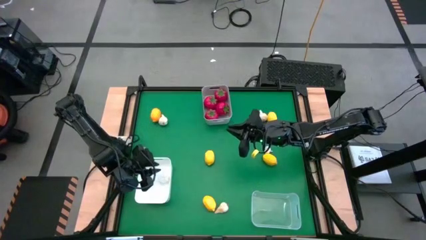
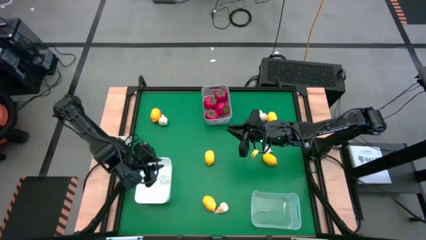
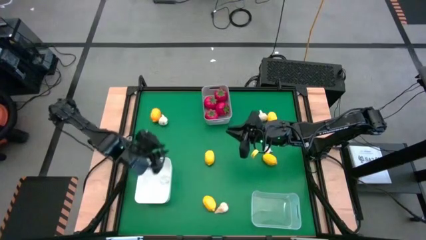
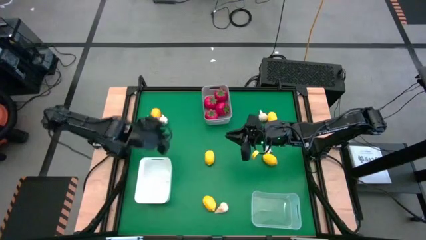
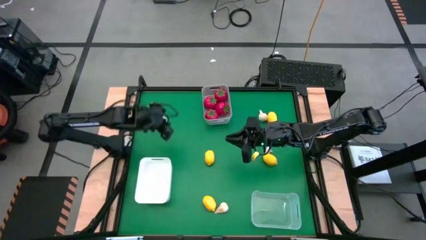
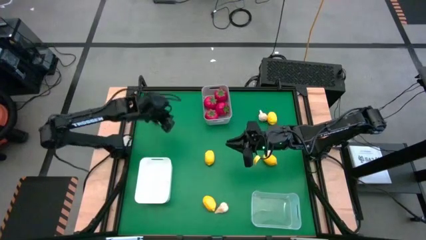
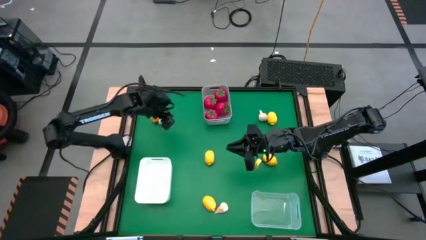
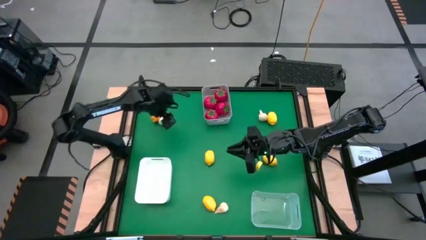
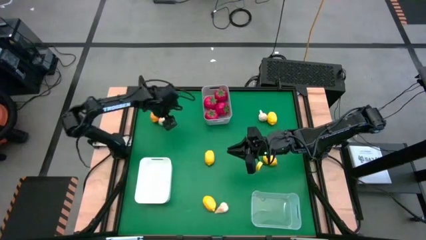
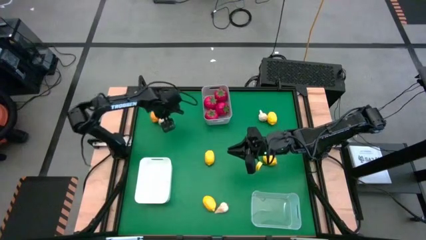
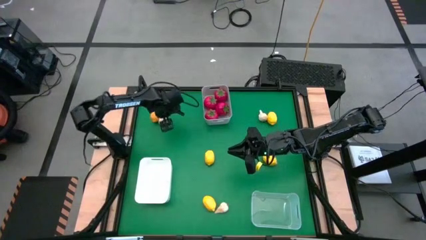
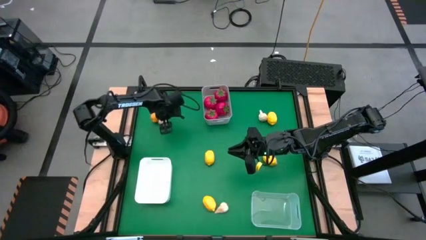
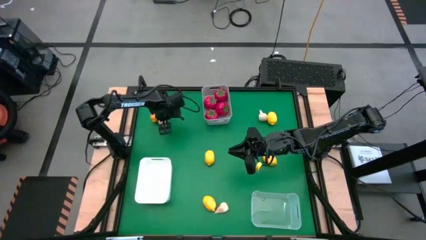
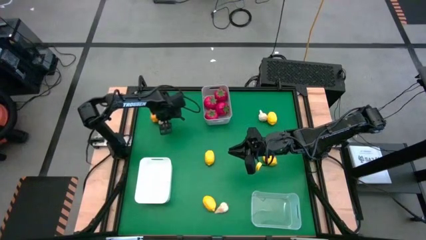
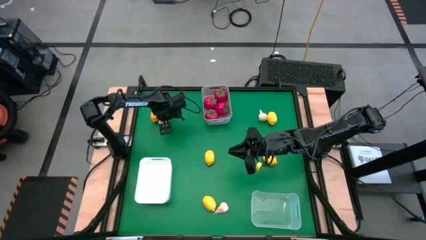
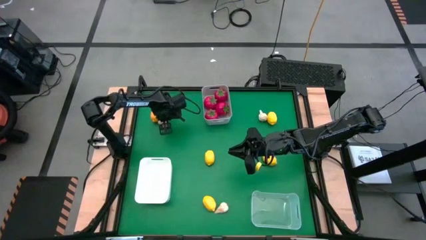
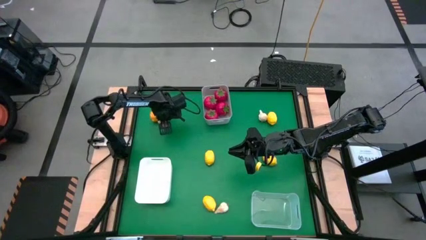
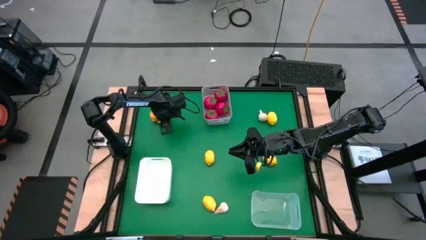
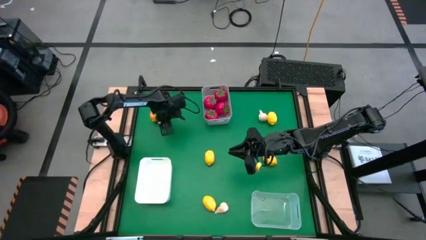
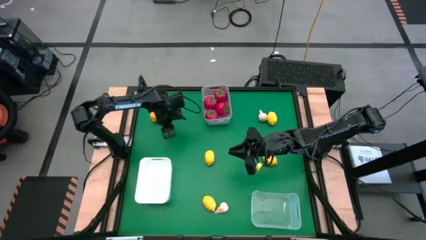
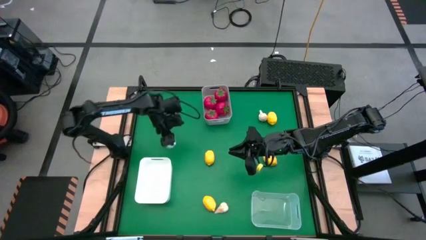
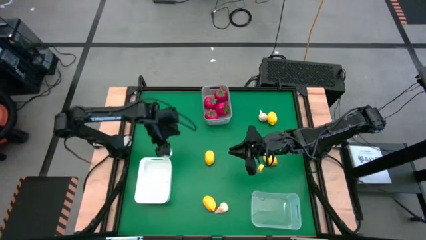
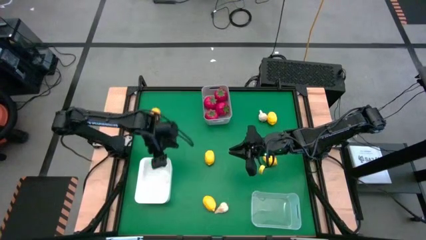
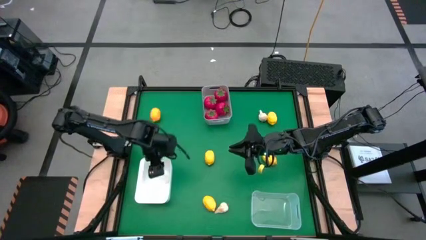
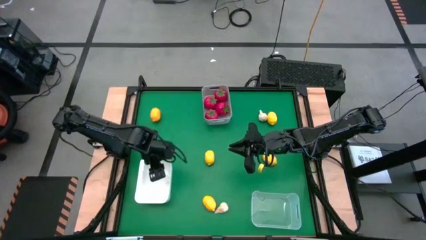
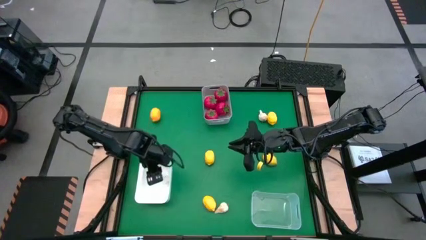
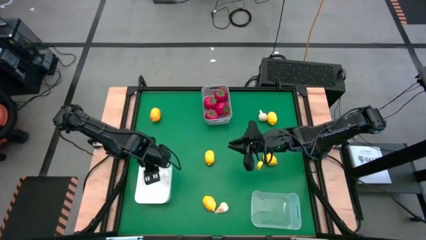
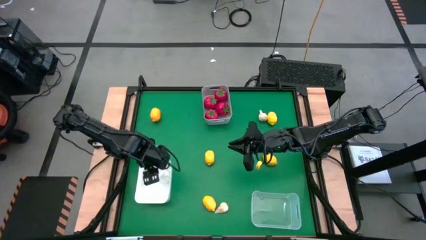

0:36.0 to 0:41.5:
Task: Sort produce into baskets
Put the garlic into the white bin

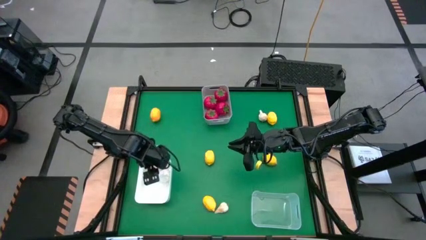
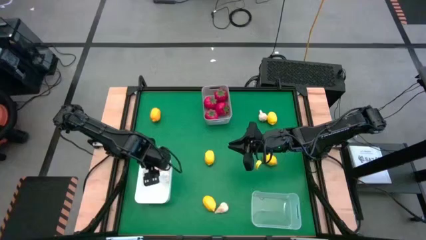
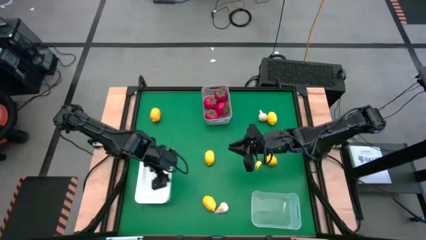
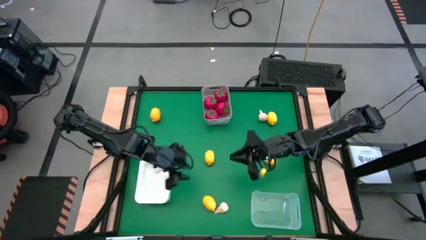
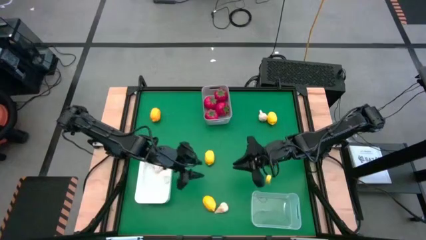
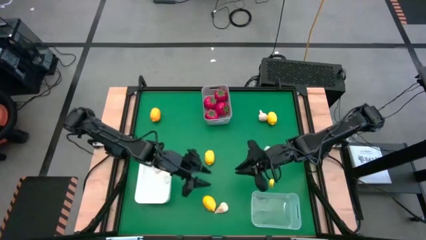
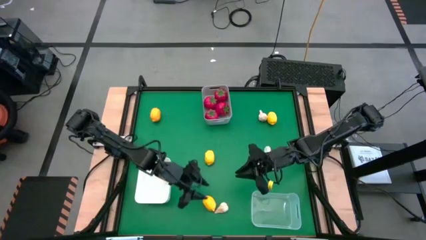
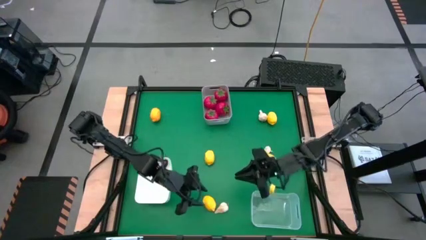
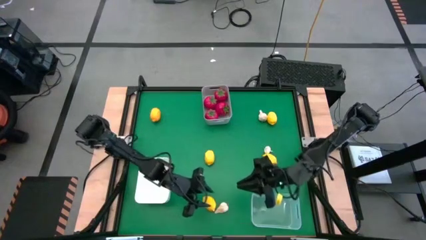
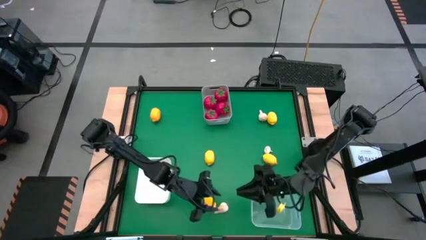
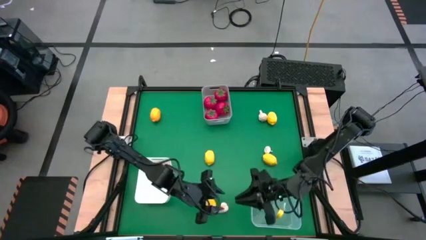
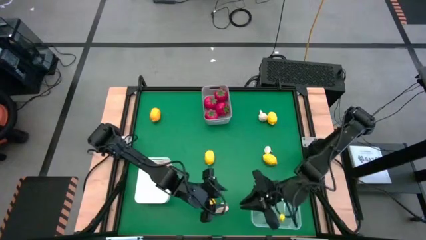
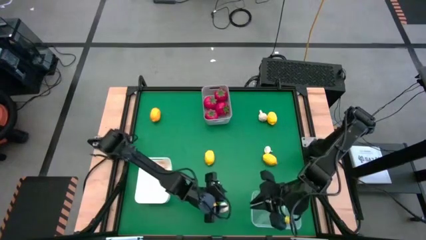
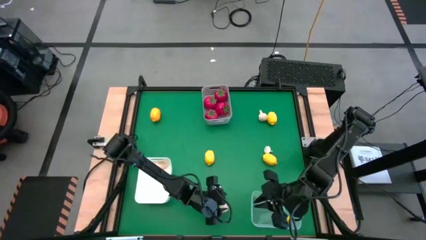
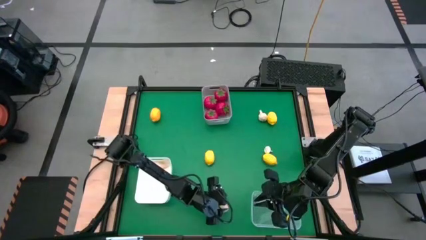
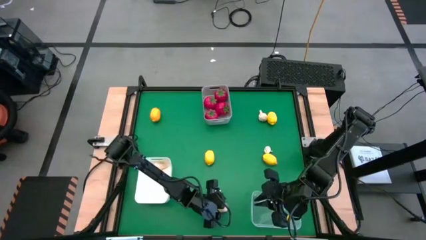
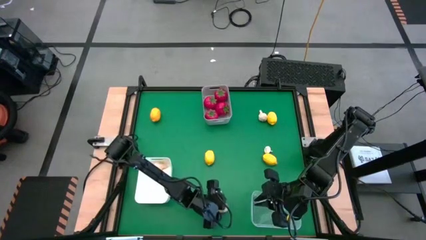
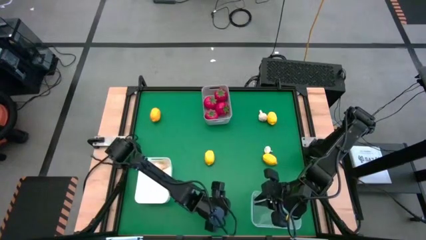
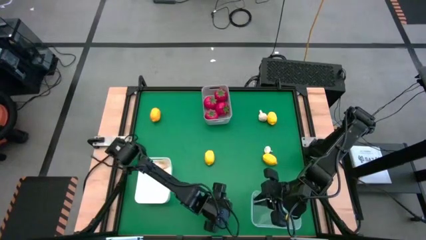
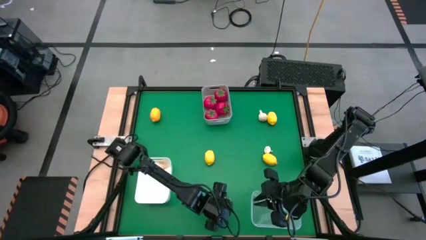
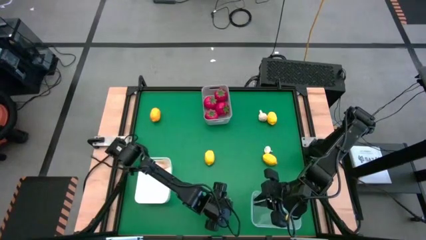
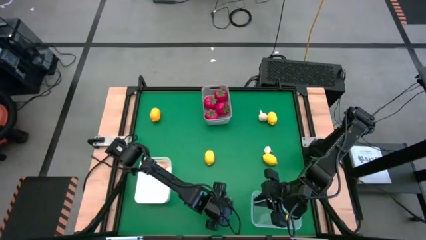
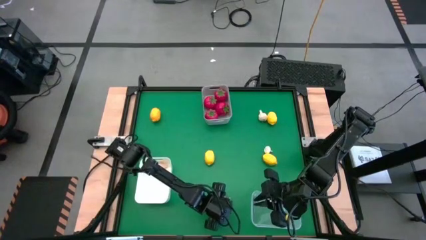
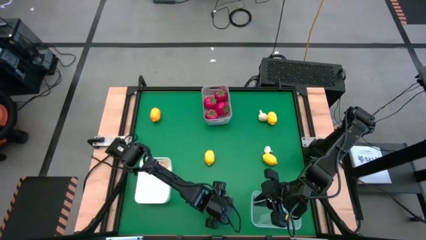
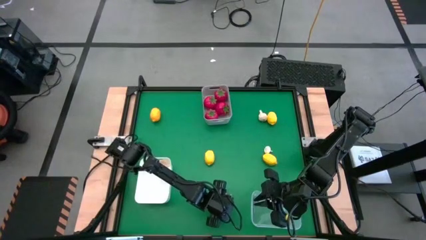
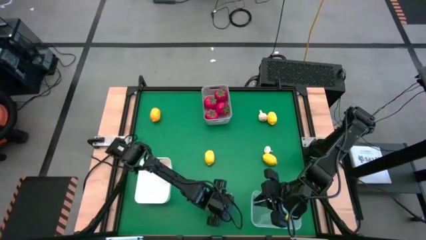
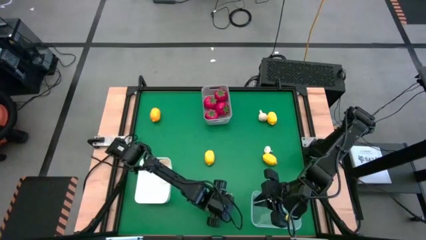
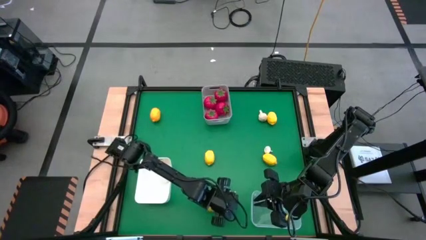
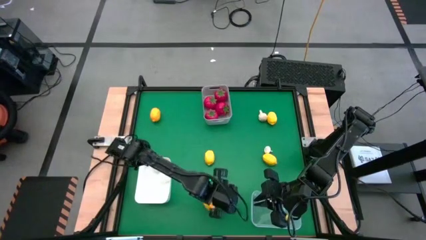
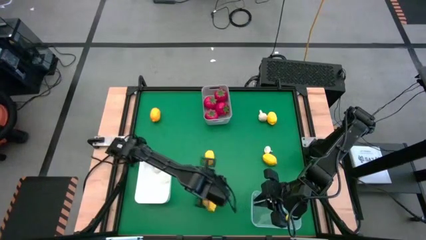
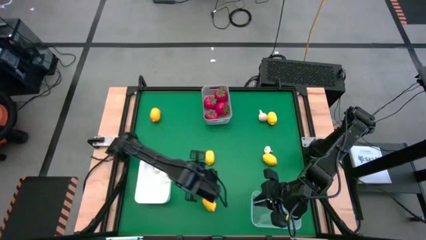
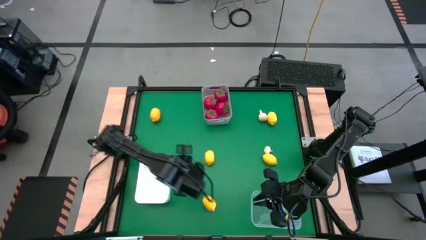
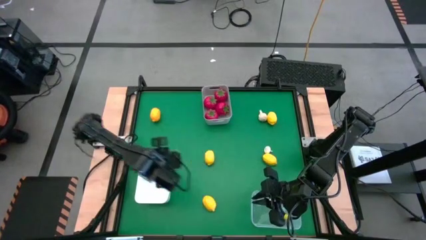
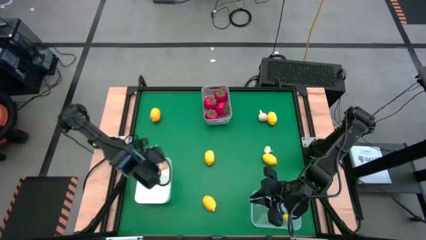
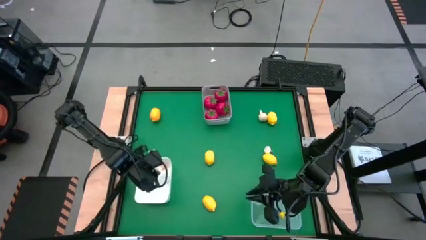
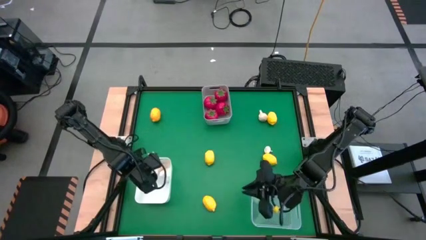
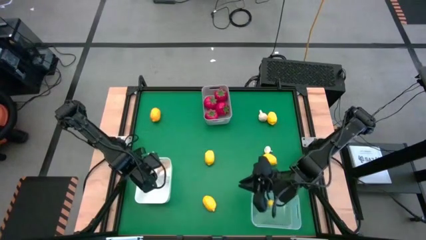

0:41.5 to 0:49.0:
Put the garlic into the white bin

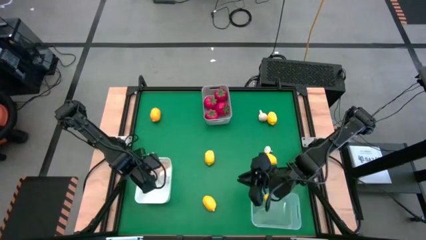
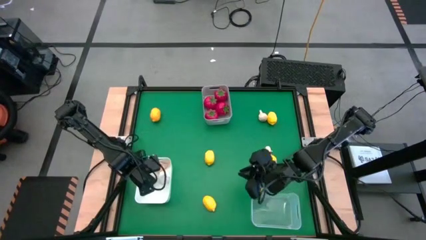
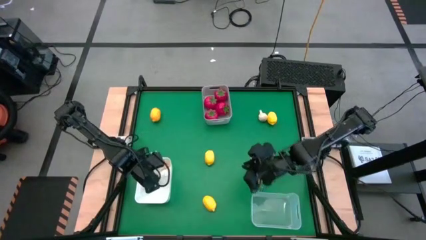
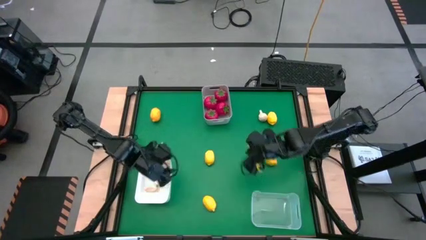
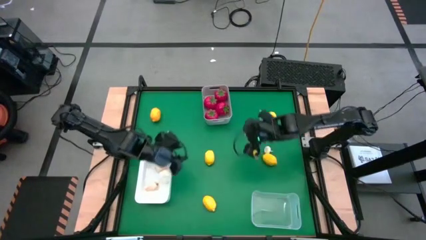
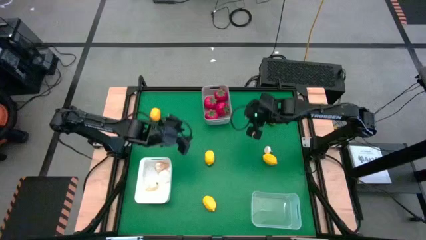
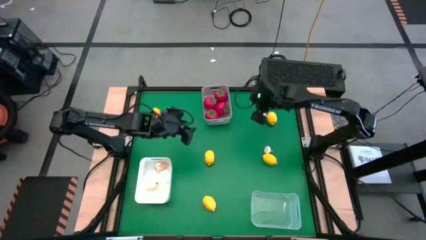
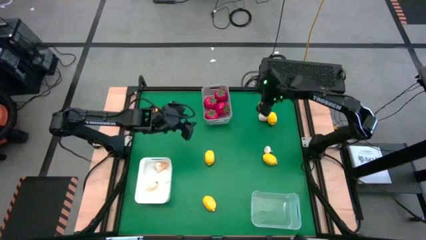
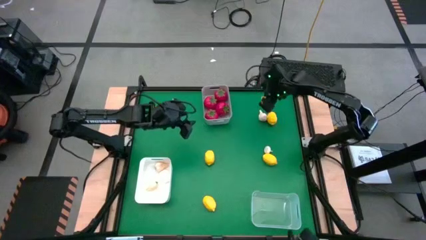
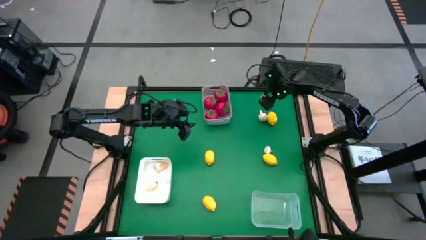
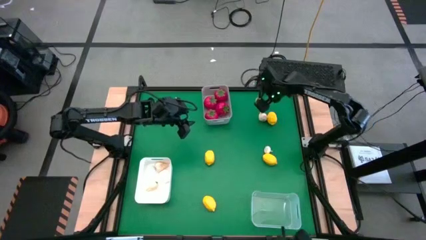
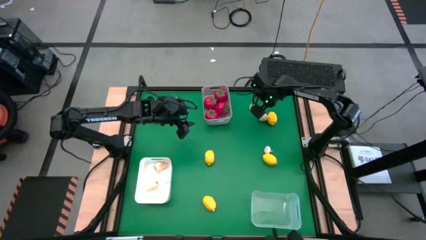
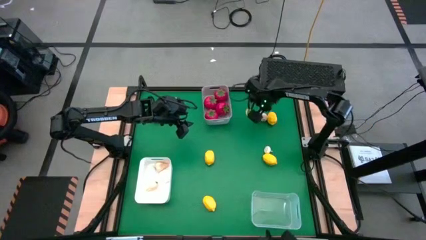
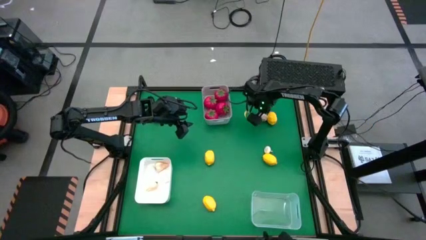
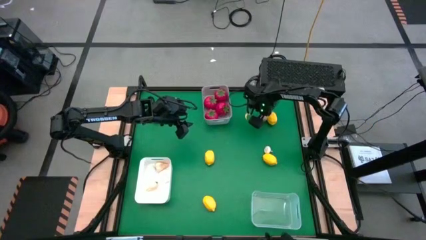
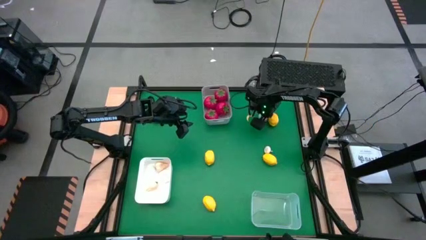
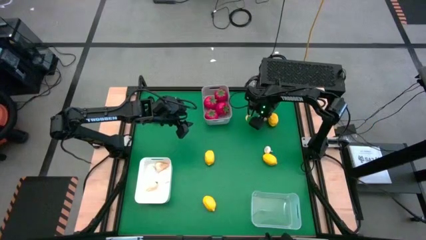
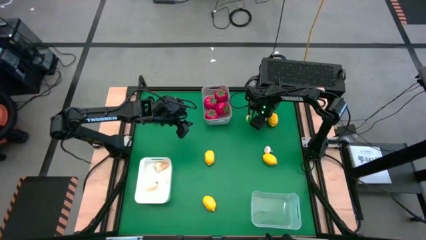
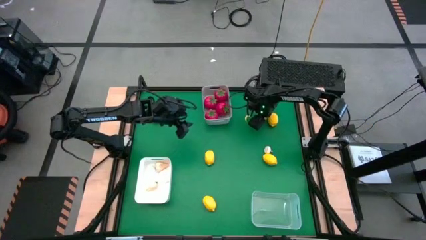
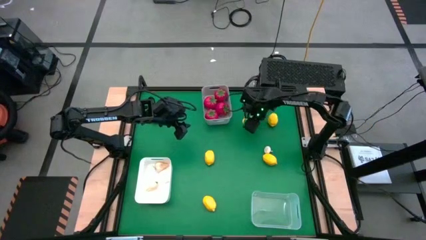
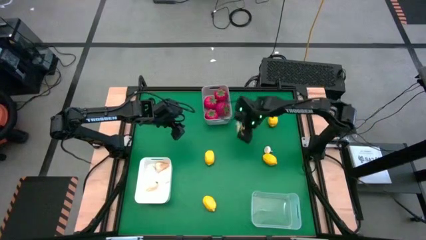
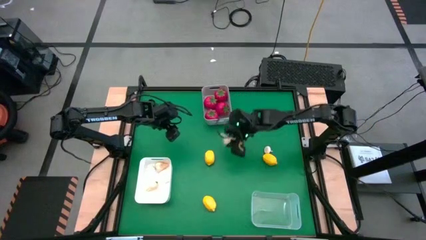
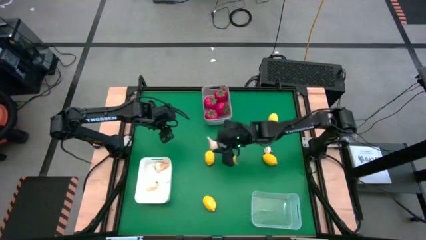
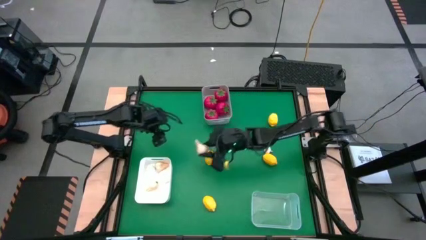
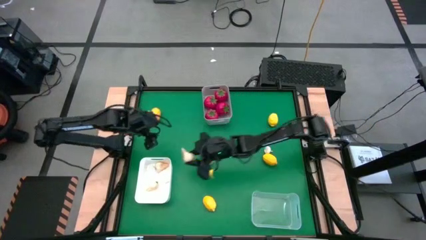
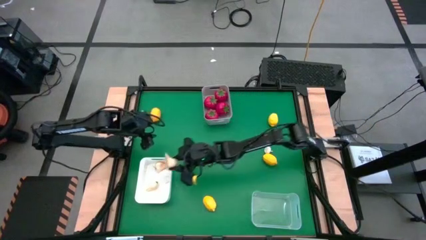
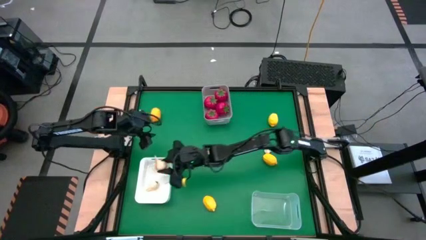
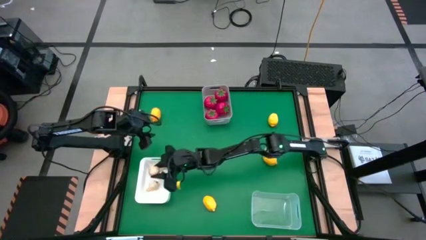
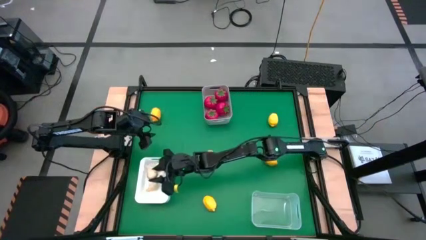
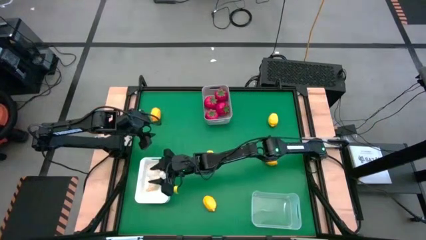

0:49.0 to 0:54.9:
Put the garlic into the white bin
